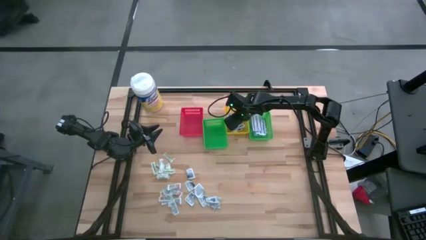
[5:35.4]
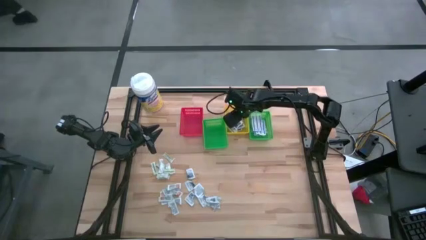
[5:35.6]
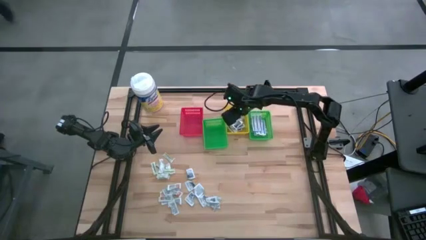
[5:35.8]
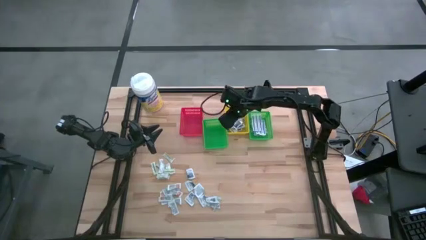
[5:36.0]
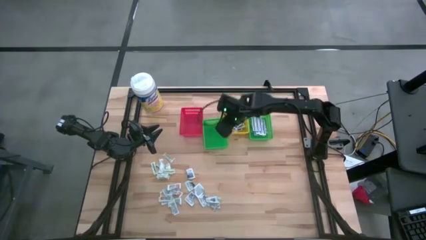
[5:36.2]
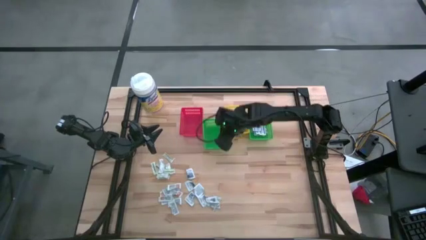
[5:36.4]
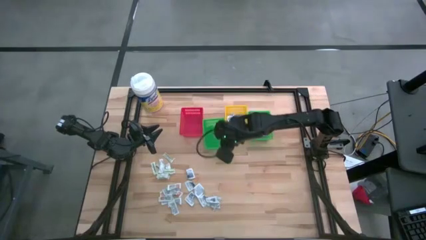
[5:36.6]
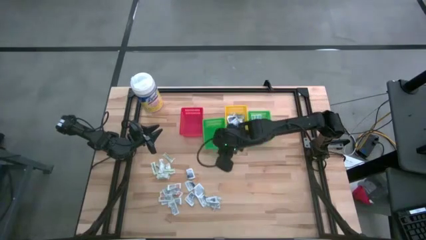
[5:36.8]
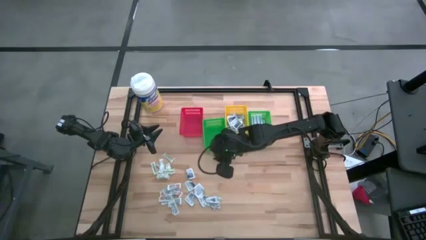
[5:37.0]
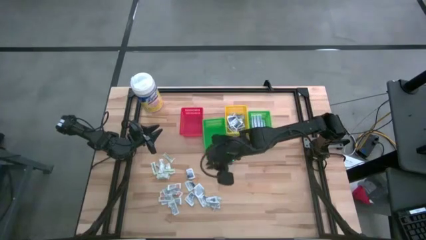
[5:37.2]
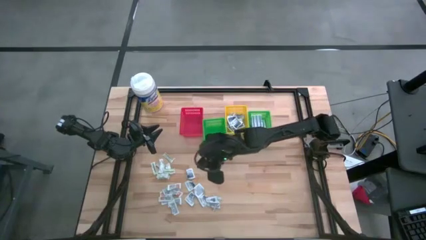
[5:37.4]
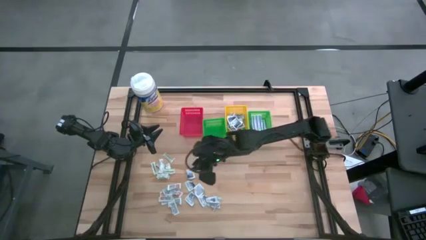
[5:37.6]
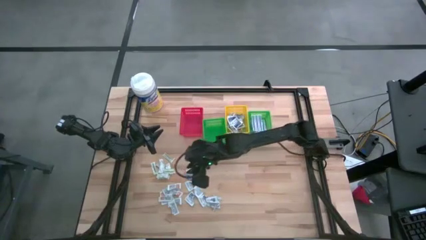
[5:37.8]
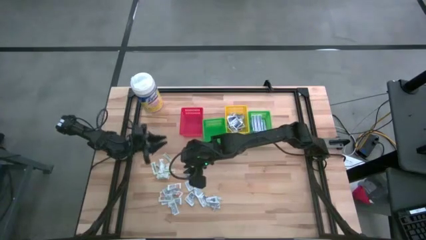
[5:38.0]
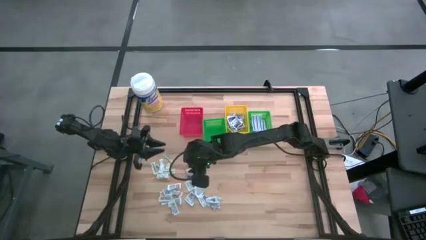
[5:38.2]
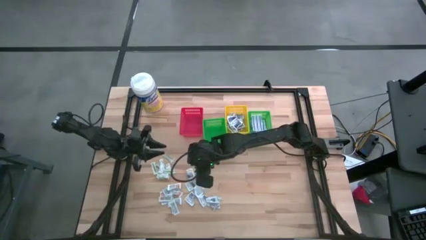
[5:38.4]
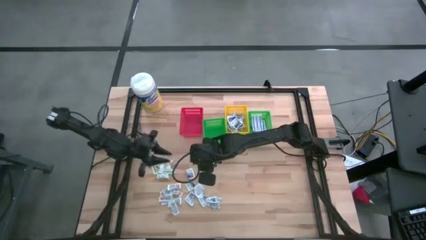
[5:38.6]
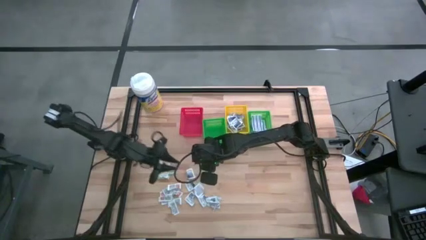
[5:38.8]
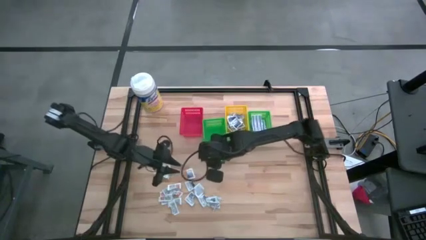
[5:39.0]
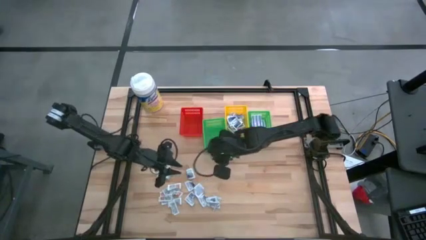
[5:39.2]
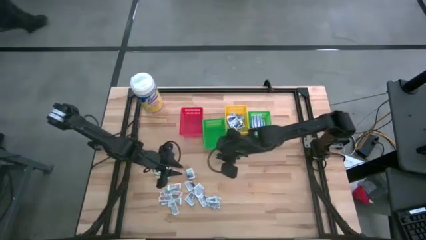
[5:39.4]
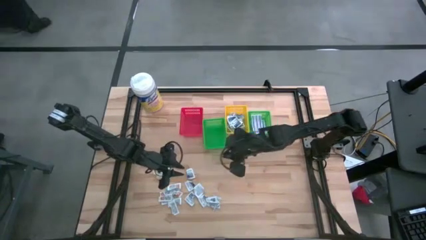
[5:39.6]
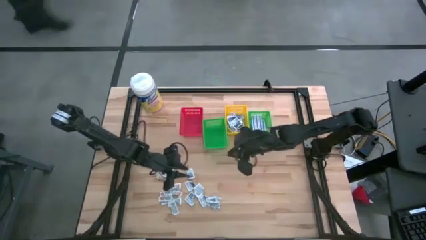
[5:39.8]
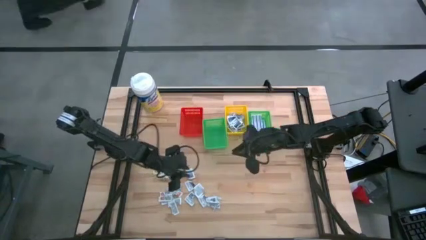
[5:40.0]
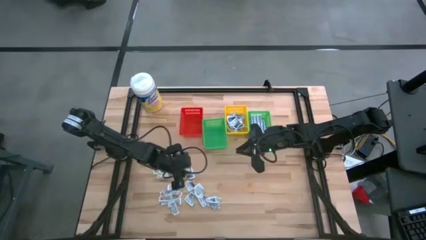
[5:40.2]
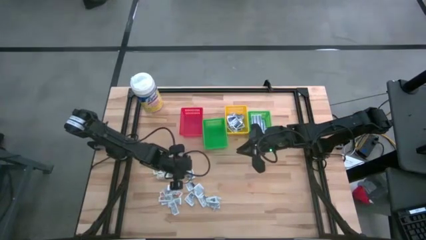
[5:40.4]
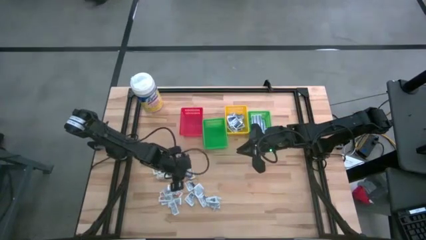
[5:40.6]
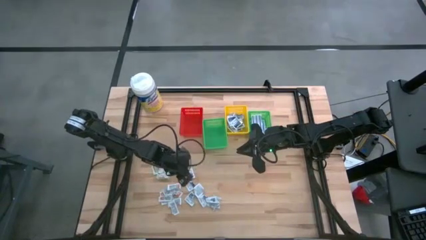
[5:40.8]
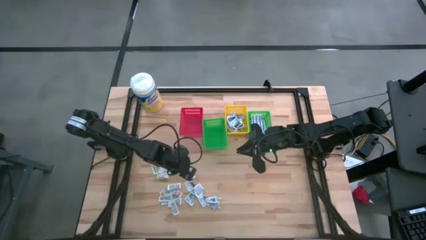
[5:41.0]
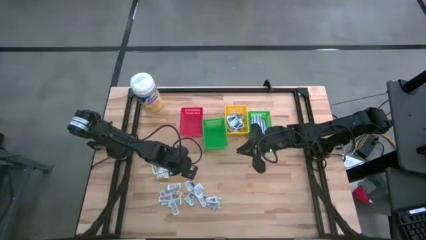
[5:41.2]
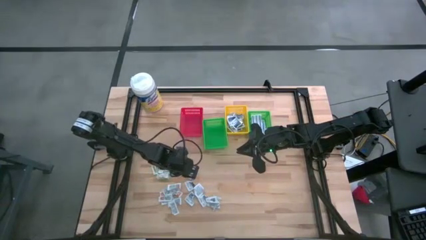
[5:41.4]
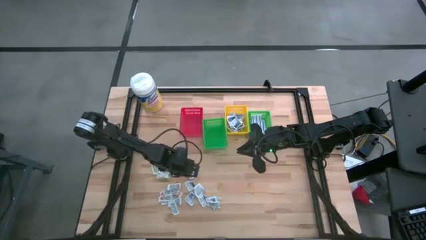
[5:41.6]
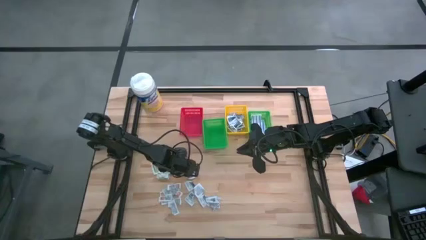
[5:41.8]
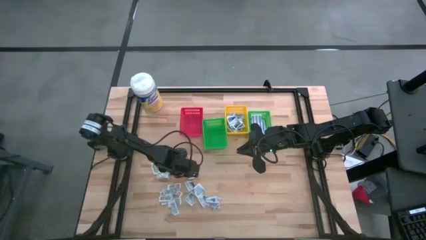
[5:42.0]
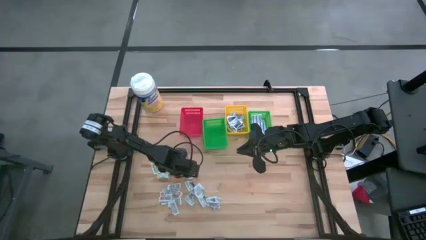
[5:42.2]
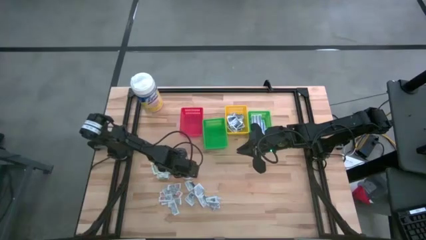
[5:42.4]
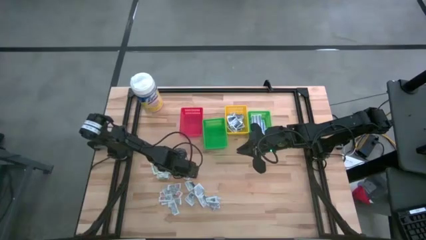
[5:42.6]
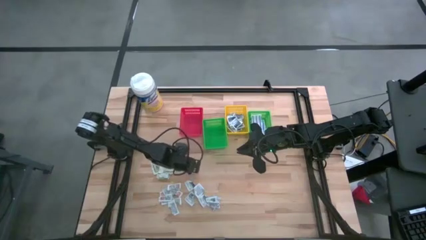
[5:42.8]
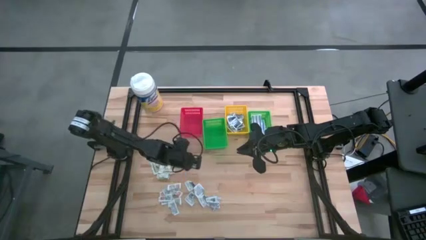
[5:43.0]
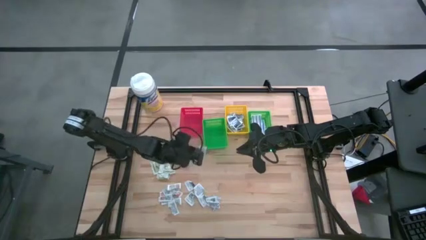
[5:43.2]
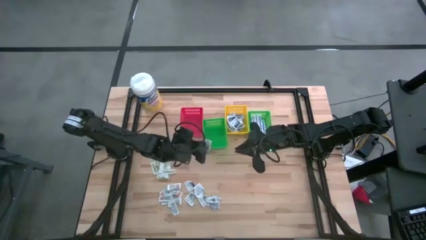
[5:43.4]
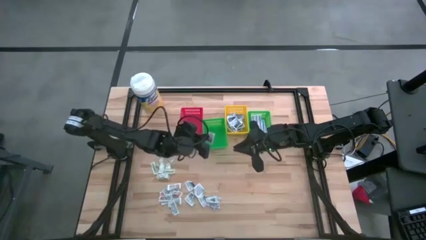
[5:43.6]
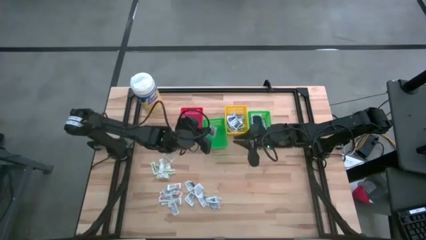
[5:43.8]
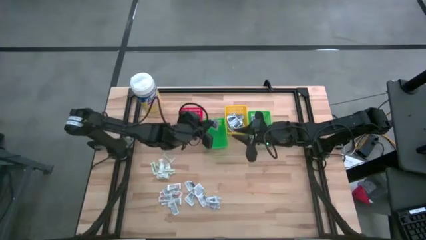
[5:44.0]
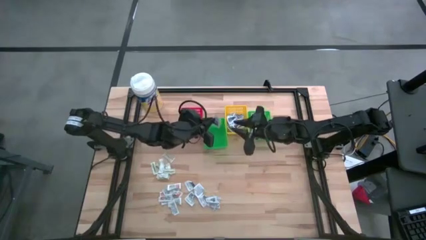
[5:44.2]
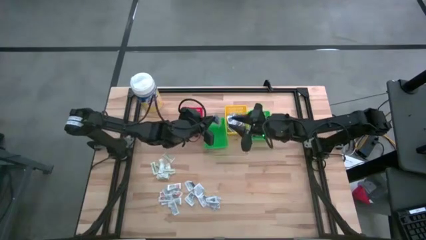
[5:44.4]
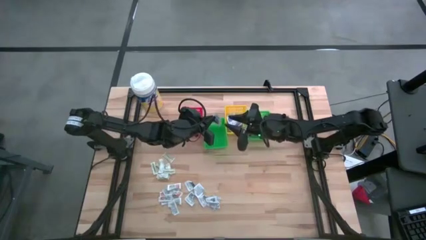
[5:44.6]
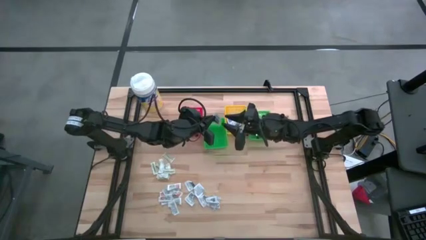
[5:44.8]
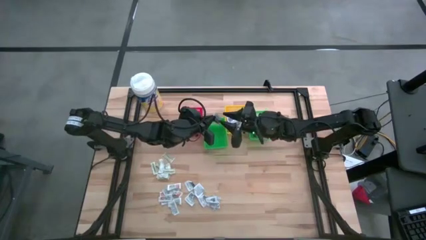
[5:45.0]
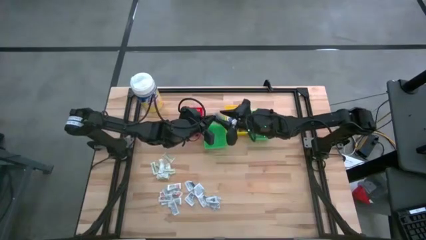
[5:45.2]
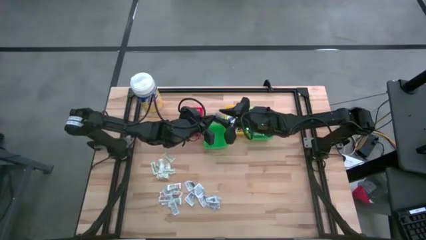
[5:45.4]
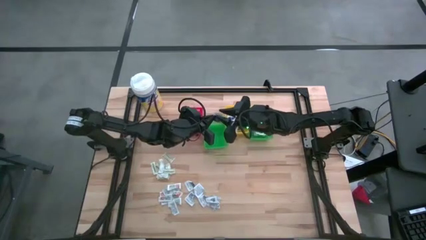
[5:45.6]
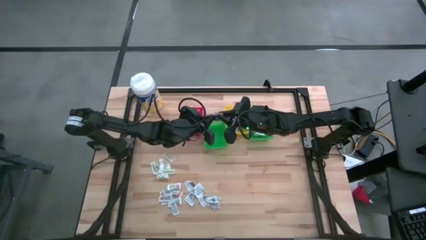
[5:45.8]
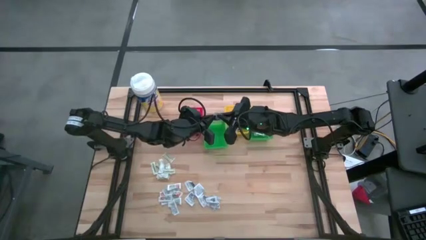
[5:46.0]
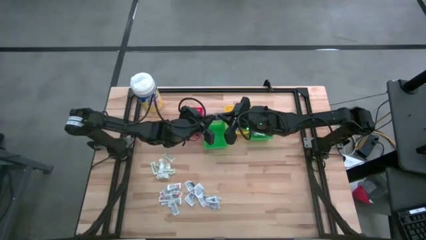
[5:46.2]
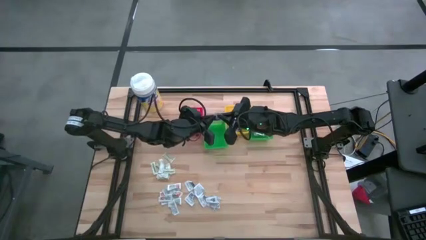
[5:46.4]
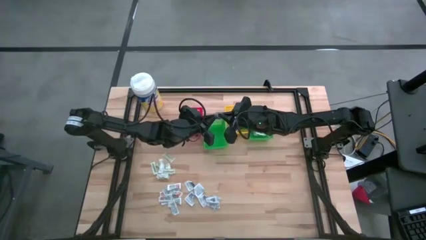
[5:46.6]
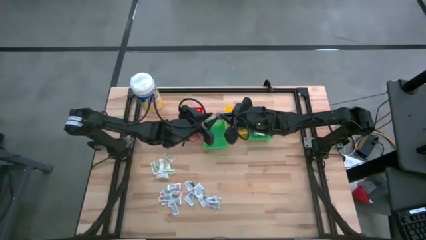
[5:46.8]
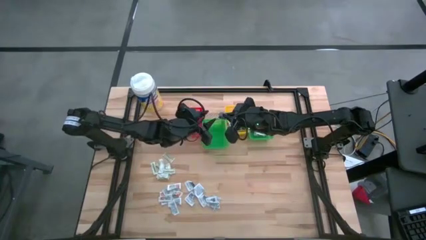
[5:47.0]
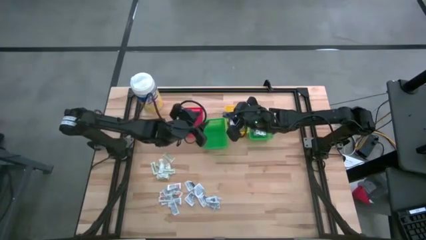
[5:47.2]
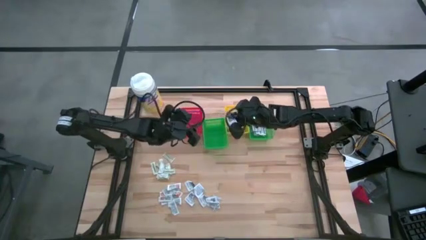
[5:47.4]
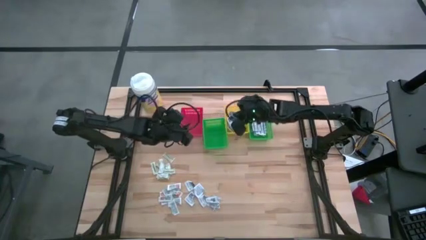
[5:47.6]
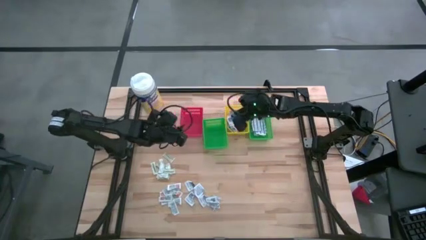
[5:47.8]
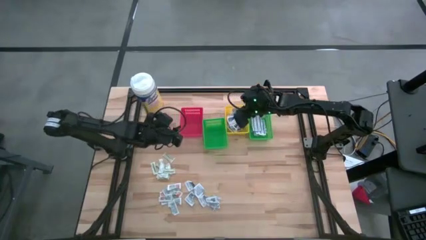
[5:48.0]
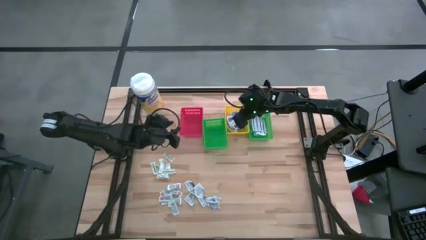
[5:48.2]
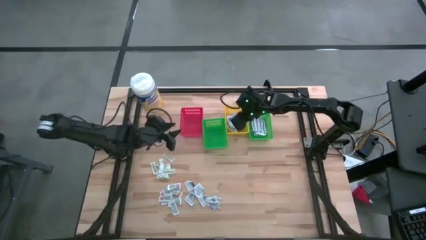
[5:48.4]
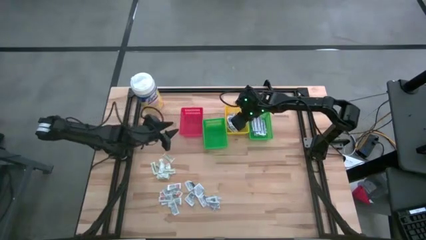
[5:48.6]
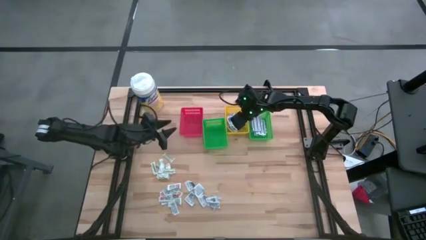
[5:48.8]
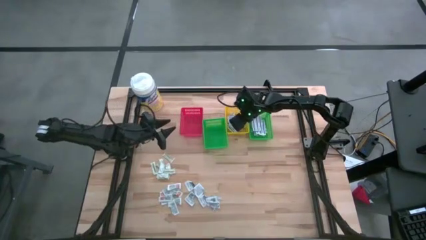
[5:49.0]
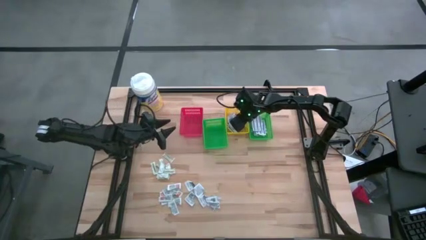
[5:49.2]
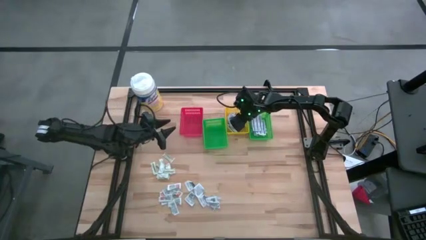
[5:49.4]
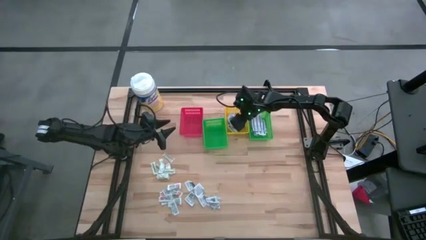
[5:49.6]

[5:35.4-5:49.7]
Task: Pick & Place First Aid Supplies
Put the alcohol pad into the yellow basket

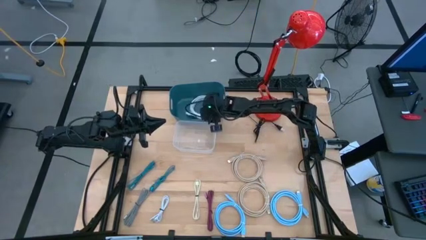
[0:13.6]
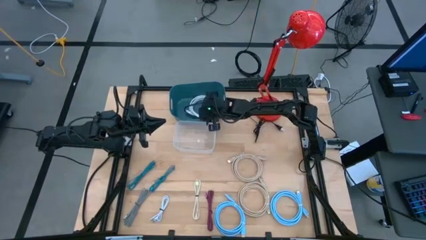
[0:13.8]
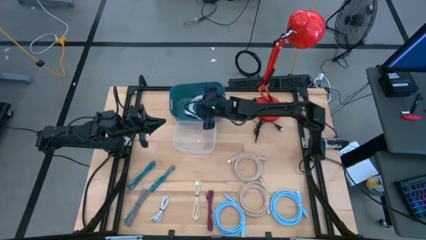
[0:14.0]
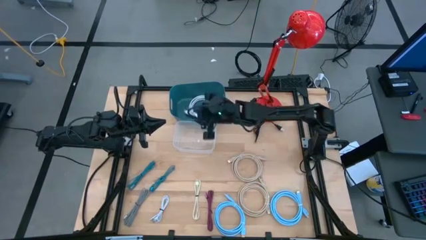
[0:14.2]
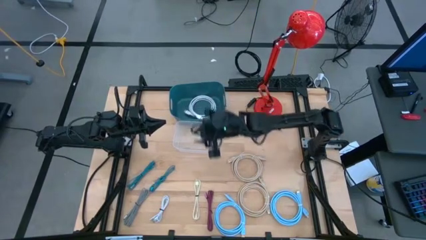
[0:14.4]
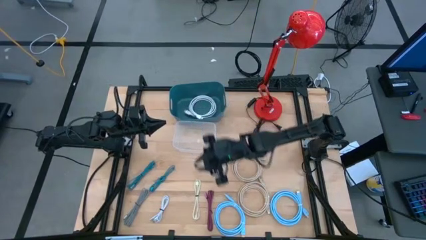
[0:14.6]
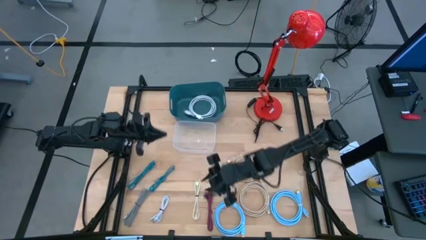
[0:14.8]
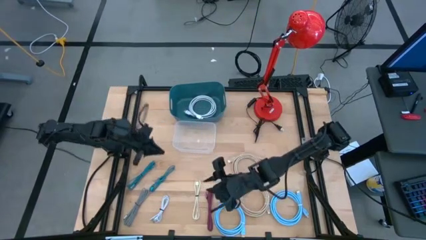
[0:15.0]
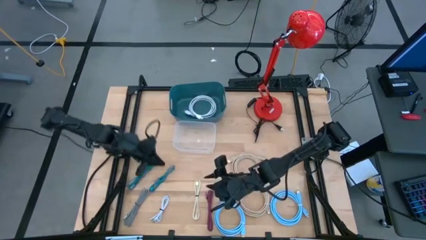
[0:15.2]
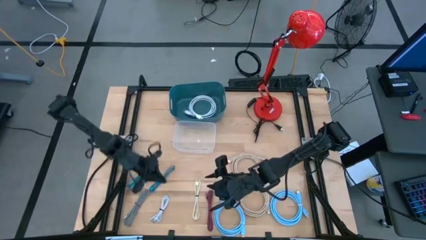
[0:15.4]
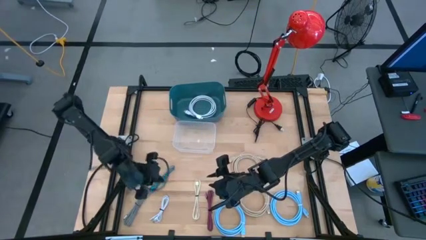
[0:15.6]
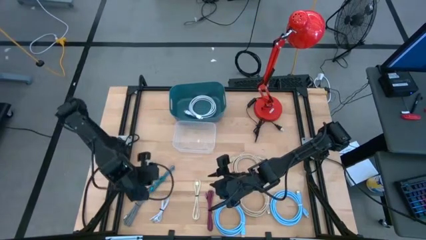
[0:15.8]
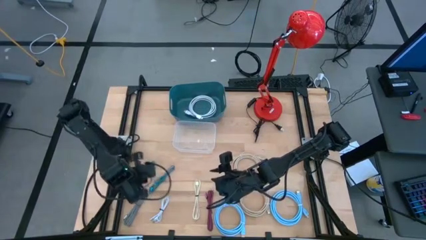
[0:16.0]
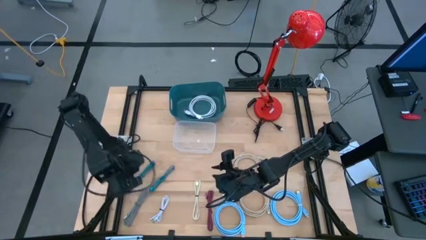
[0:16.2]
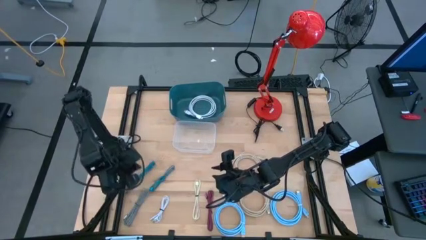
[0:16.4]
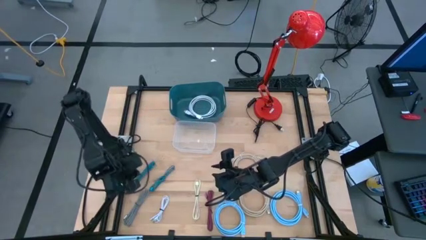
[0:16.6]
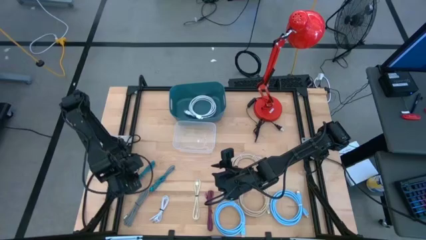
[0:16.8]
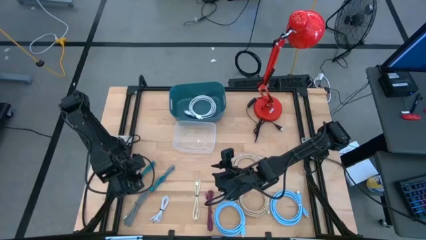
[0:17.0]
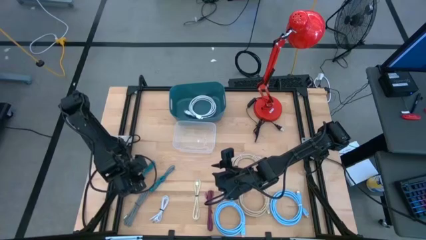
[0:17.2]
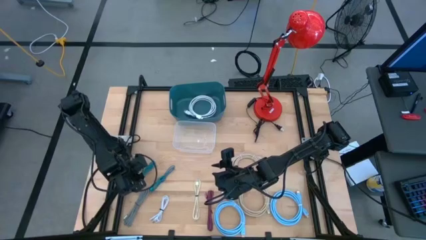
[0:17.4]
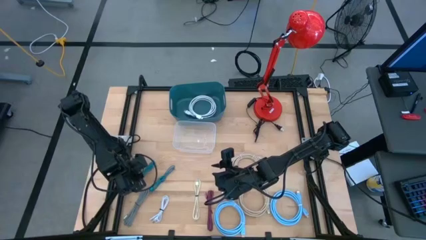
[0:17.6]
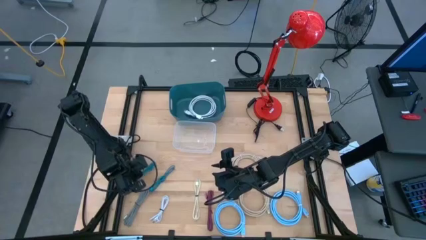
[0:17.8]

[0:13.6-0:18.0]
Task: Pick & Place USB Port
Put the left blue charger cable into the transparent bin
